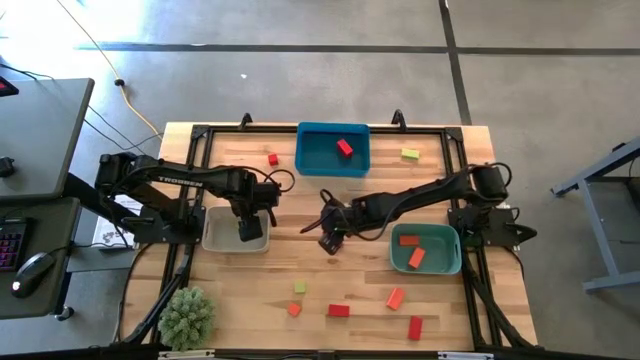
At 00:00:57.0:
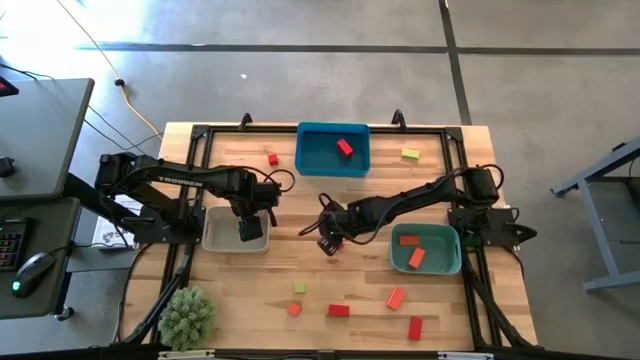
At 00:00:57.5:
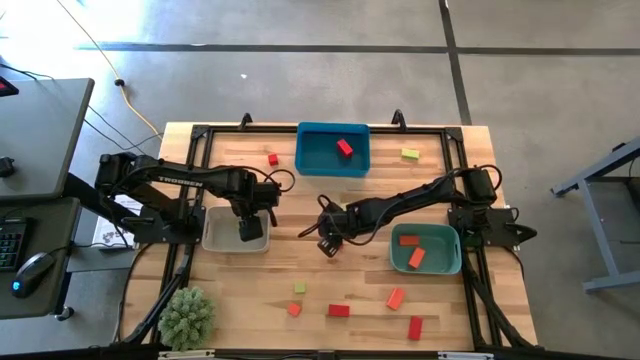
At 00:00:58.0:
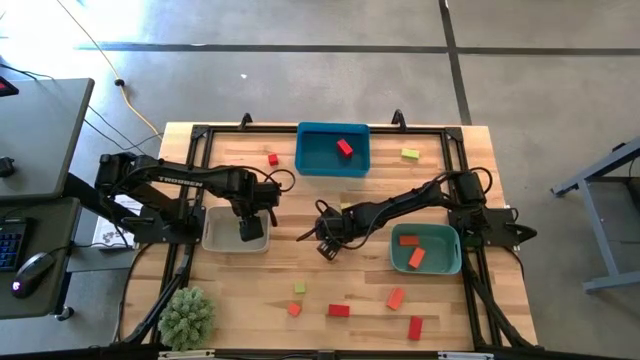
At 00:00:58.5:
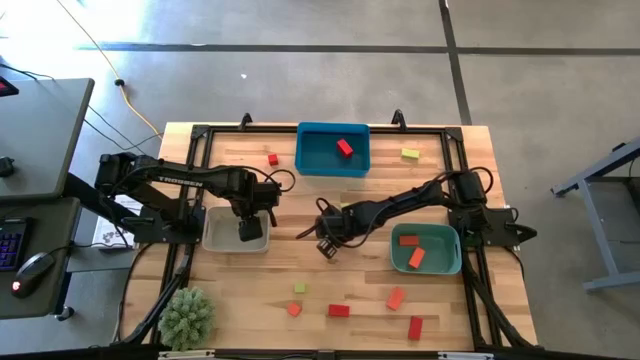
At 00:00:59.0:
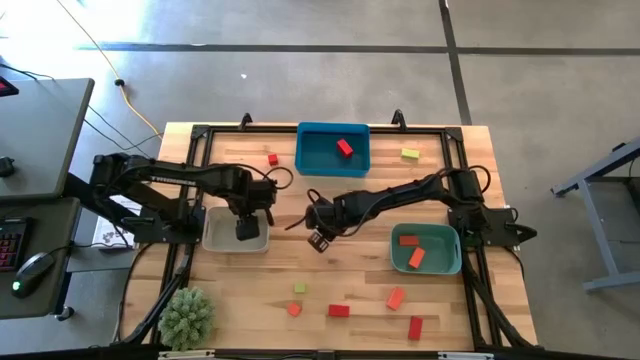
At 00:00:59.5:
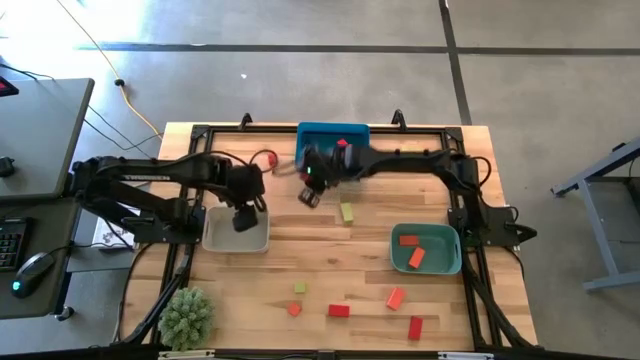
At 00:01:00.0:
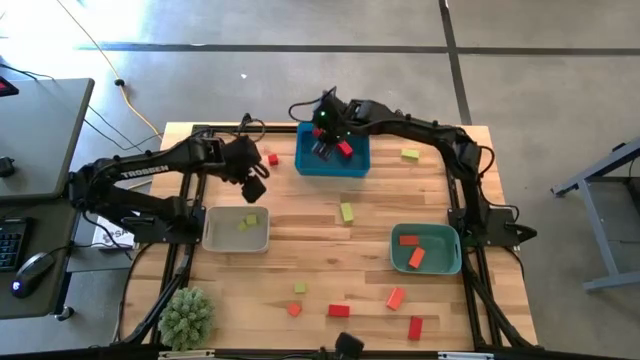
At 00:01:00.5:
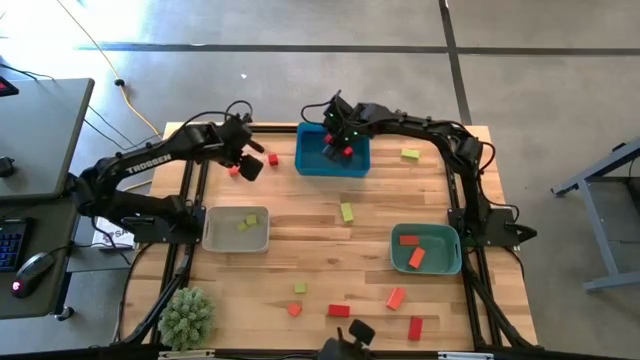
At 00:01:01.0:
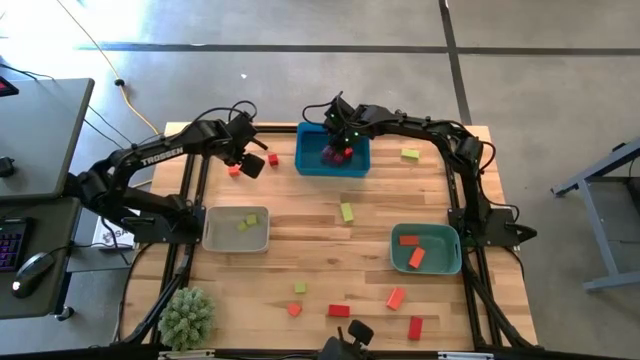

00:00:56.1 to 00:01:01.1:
Task: Sort & place blocks by color
Put the center red block into the blue bin

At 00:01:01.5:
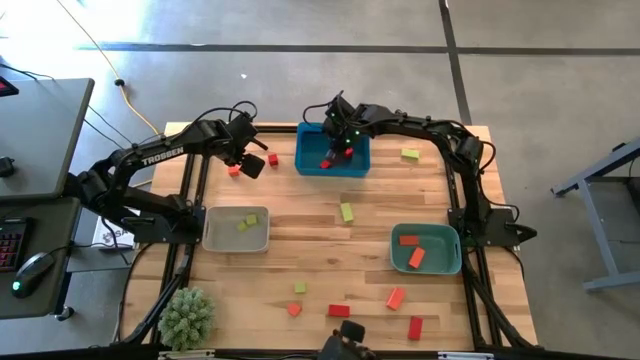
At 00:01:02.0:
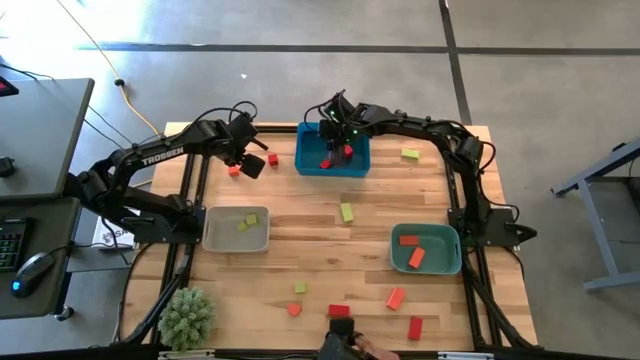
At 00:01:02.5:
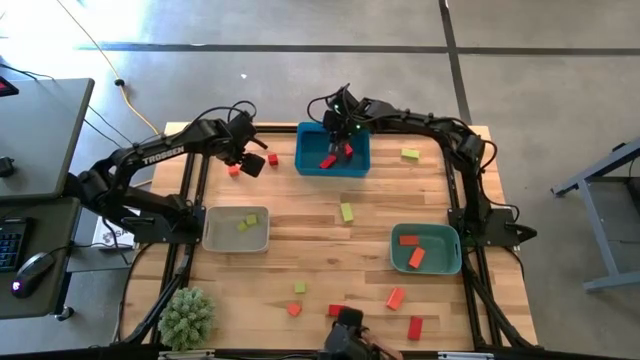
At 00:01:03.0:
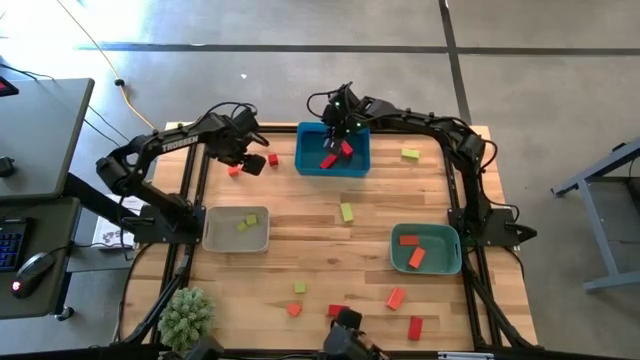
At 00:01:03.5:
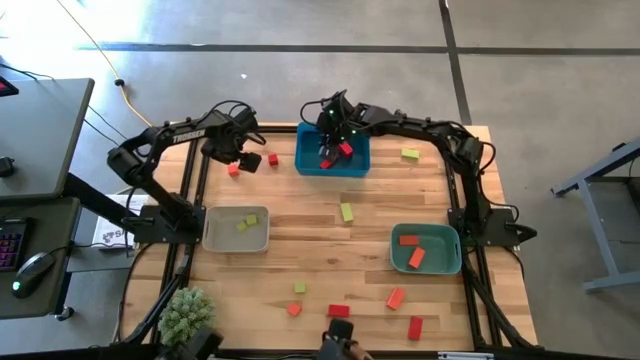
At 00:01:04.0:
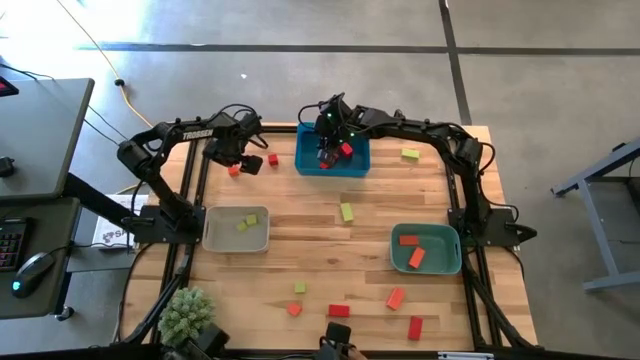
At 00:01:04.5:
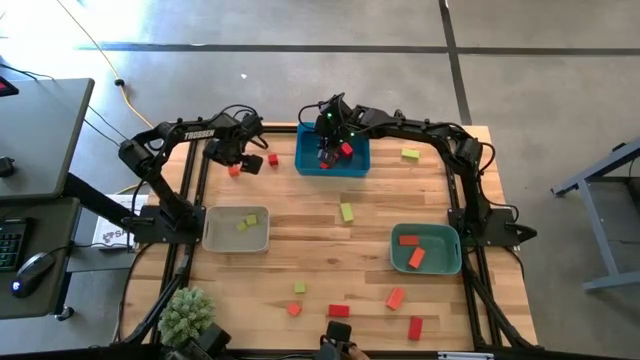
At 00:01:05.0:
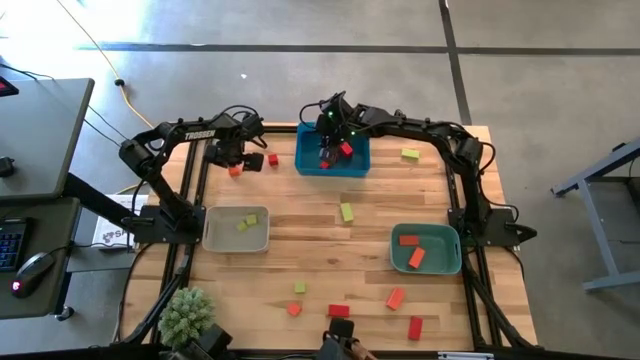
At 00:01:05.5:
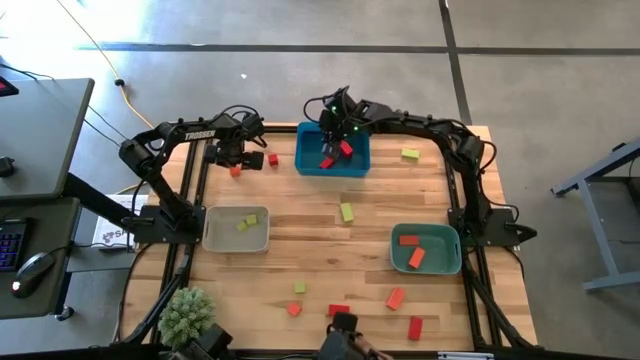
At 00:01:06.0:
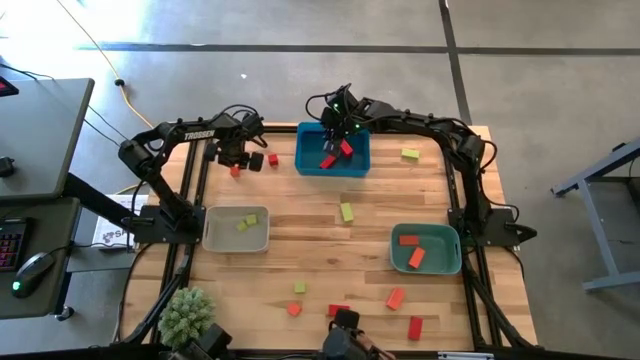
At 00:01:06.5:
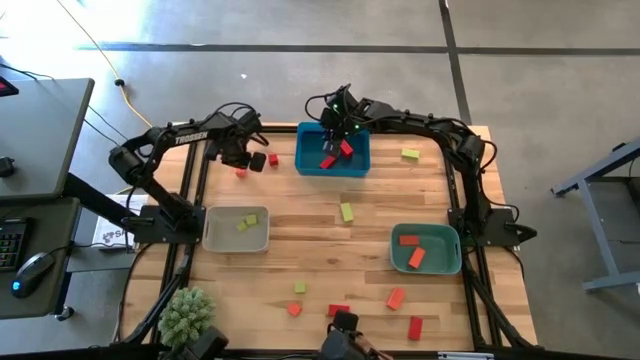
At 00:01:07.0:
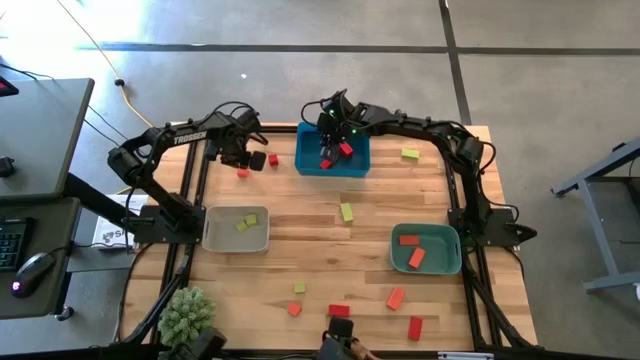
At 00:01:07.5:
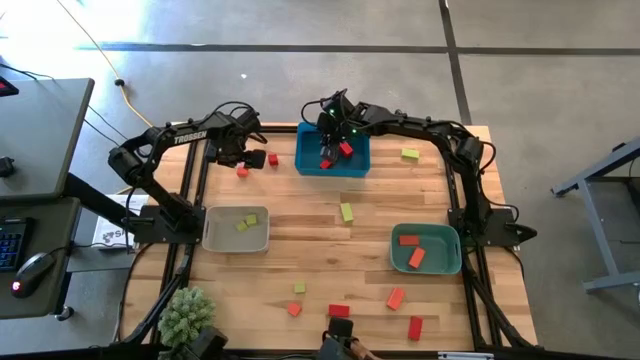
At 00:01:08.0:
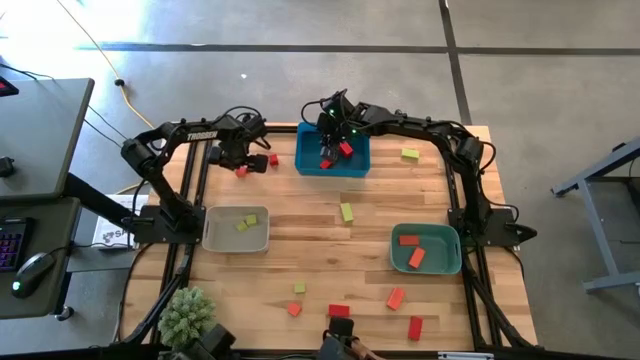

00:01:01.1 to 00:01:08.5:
Put the top orange block into the green bin

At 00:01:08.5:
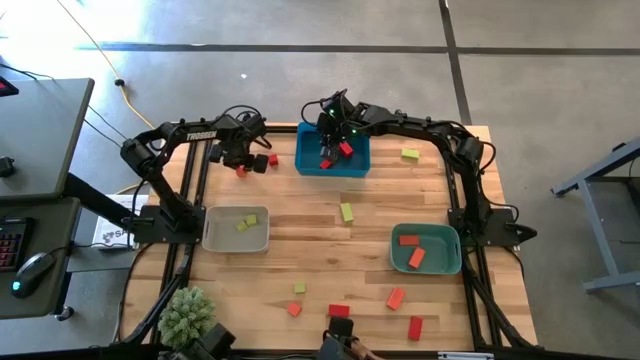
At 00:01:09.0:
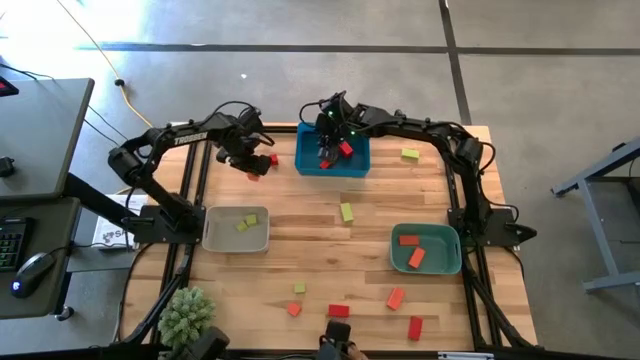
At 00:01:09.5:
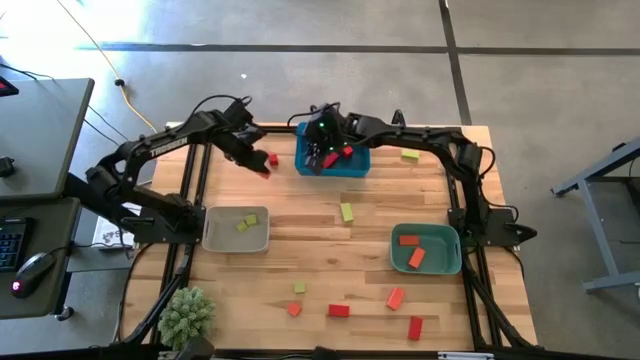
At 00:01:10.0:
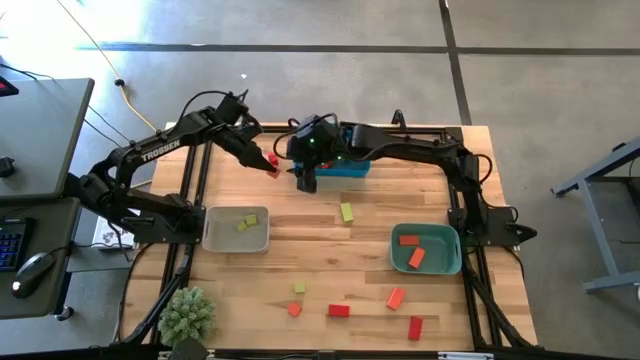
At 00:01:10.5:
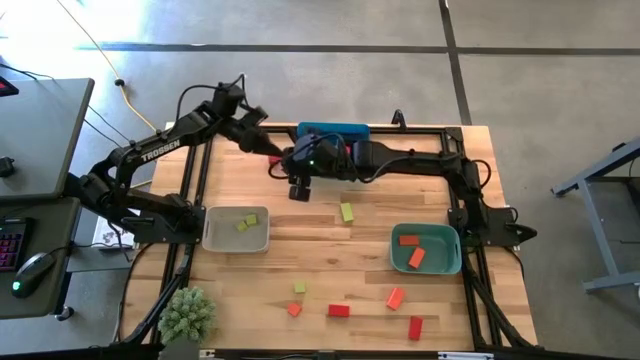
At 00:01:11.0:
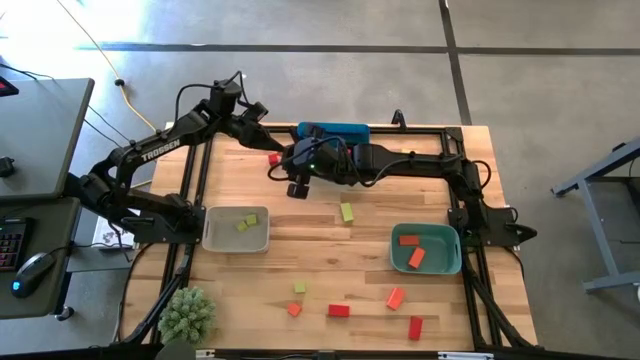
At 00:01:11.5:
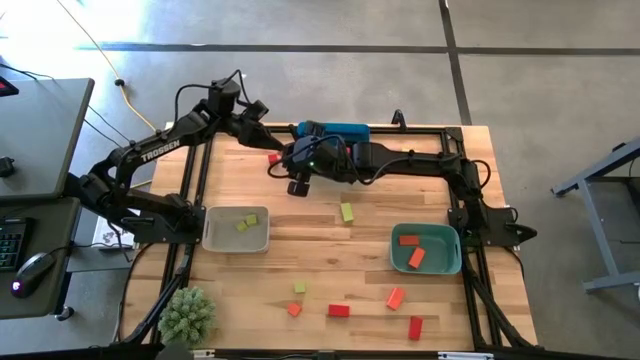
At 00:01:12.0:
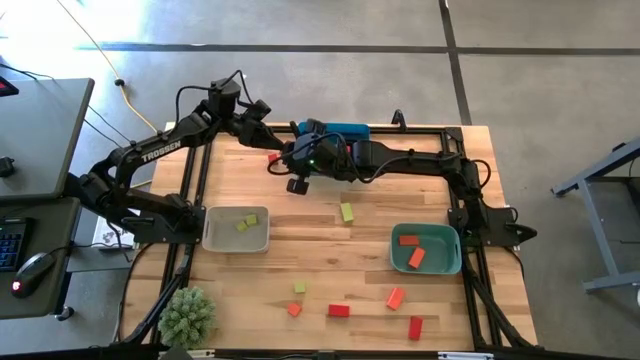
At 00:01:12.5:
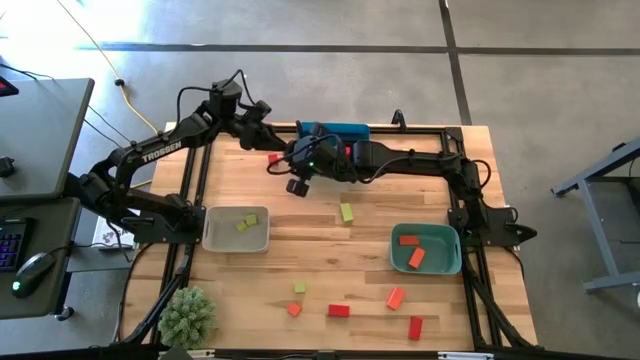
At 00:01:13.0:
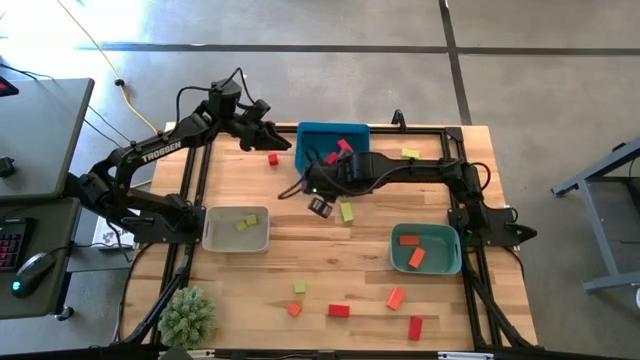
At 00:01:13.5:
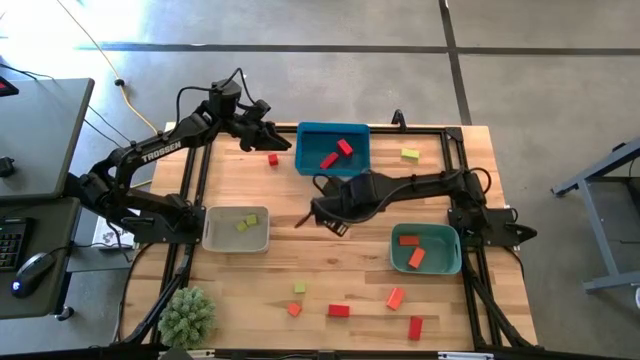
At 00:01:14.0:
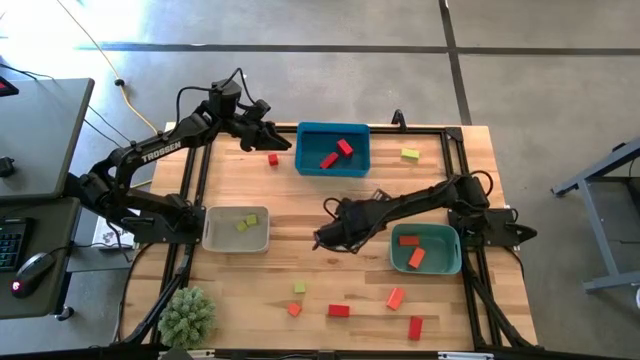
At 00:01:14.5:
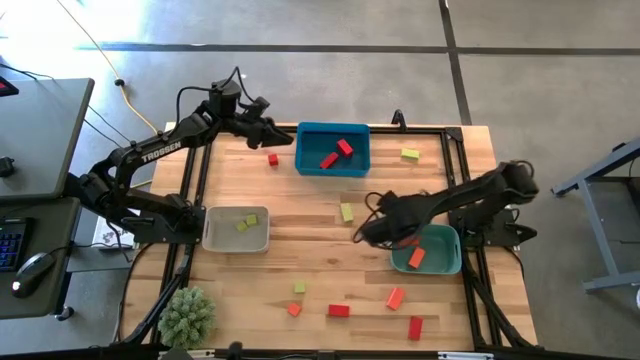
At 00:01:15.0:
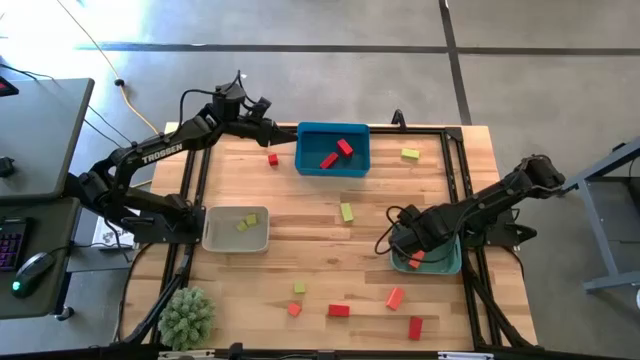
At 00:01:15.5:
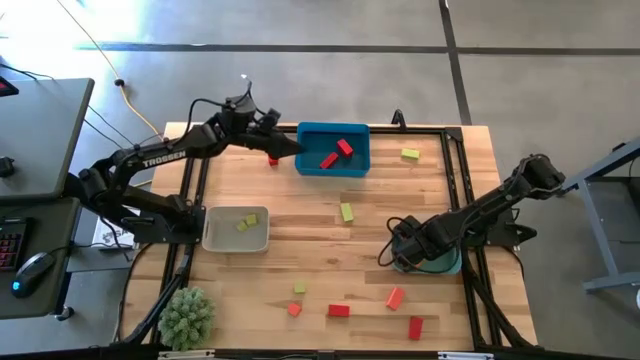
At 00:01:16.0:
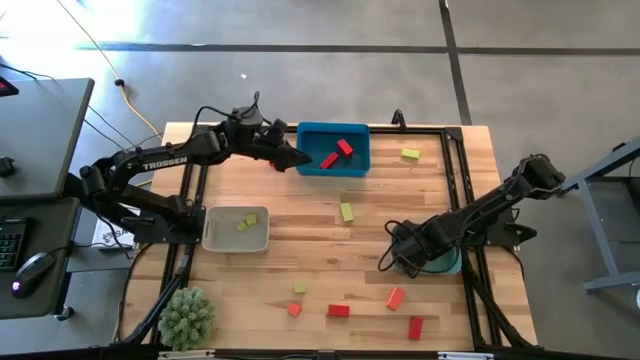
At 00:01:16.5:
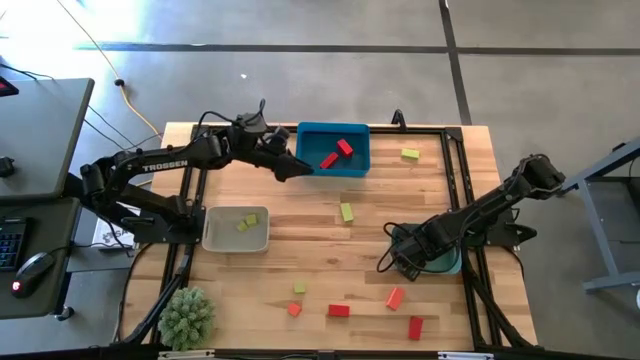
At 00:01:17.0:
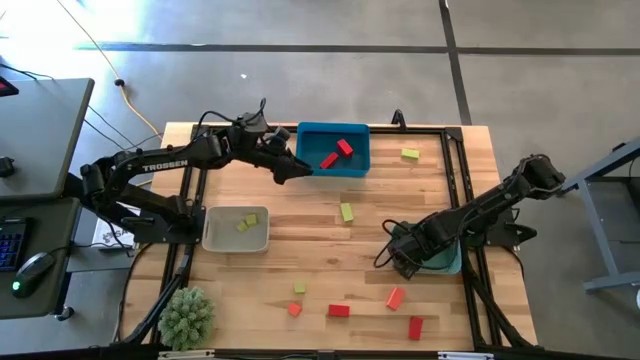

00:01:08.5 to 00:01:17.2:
Put the top orange block into the green bin
